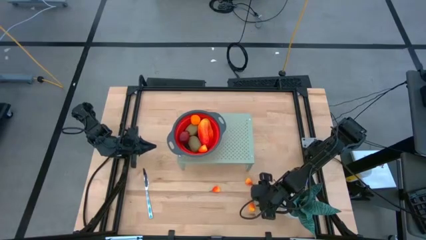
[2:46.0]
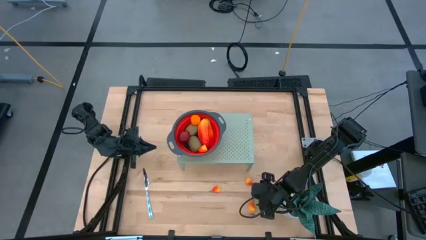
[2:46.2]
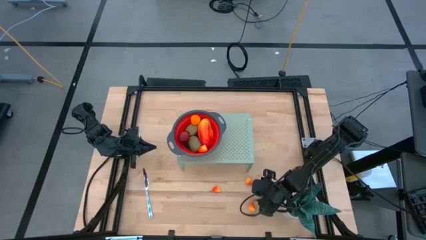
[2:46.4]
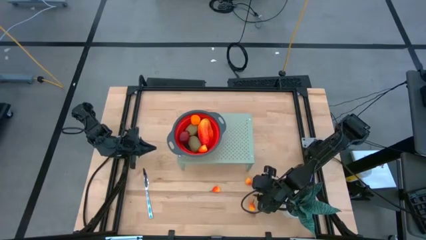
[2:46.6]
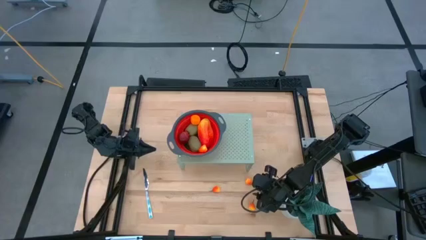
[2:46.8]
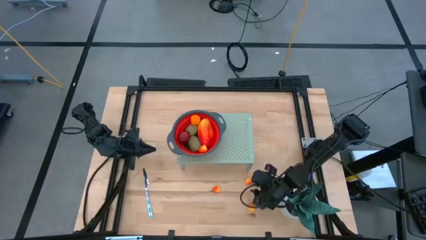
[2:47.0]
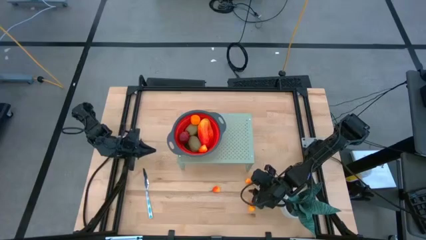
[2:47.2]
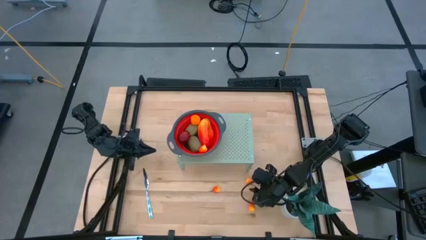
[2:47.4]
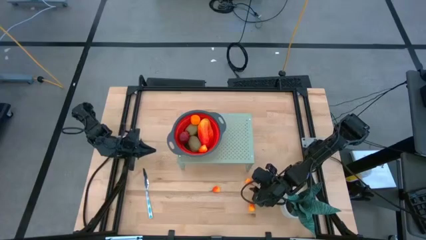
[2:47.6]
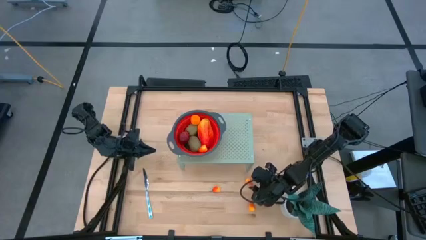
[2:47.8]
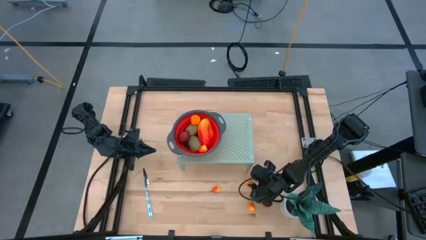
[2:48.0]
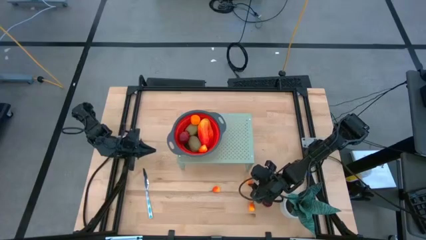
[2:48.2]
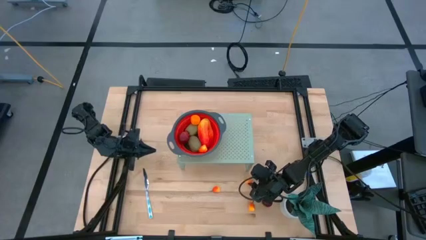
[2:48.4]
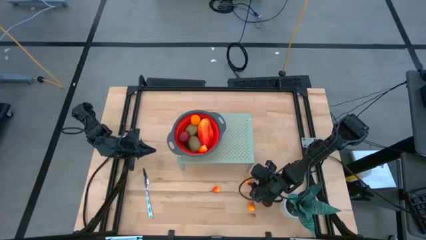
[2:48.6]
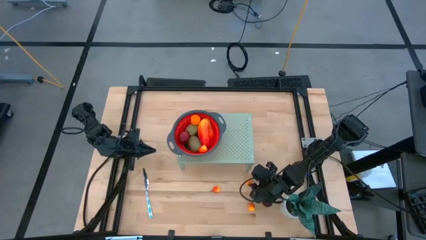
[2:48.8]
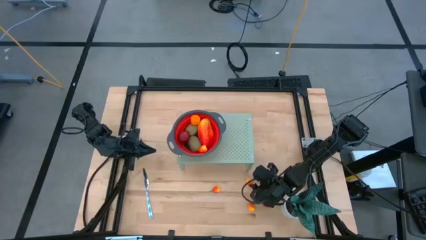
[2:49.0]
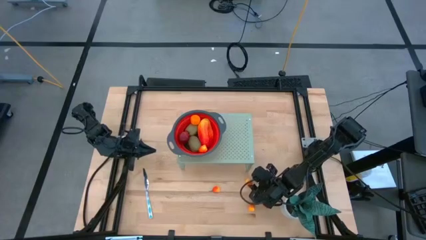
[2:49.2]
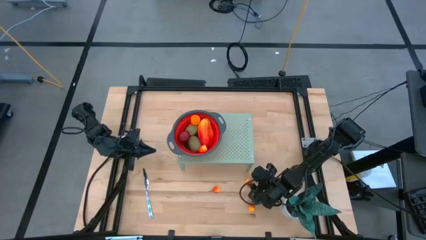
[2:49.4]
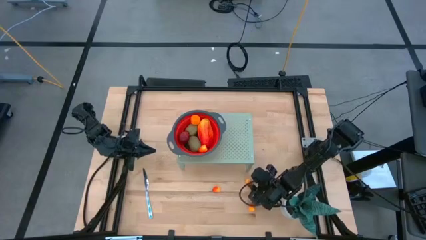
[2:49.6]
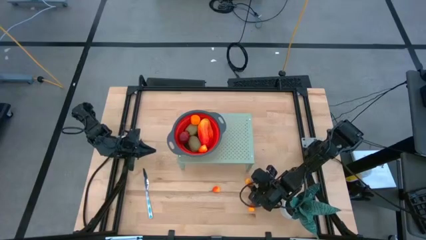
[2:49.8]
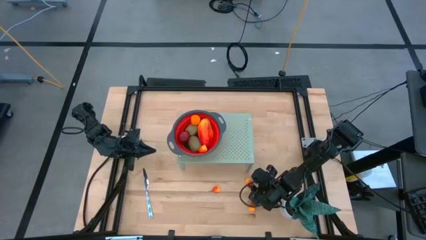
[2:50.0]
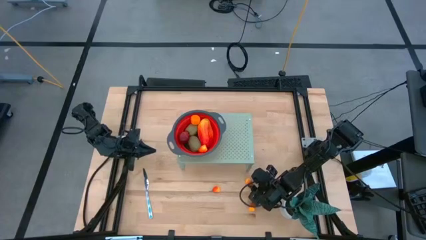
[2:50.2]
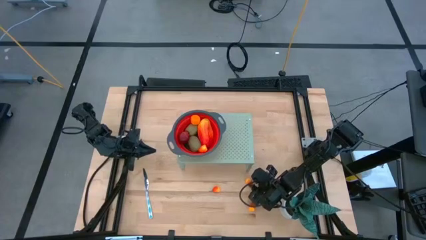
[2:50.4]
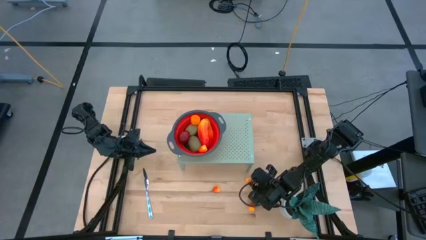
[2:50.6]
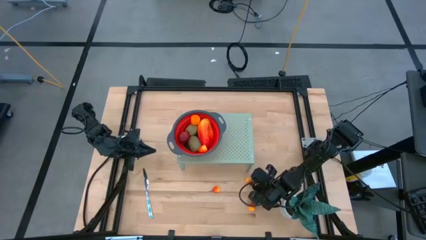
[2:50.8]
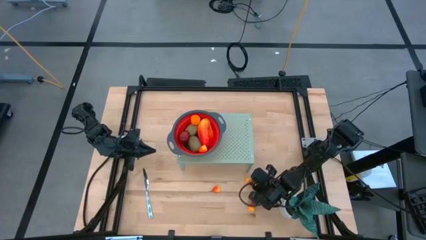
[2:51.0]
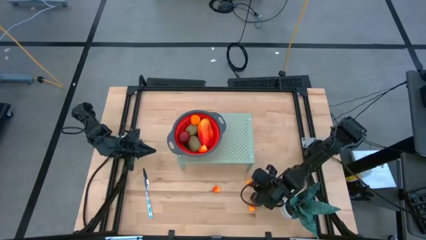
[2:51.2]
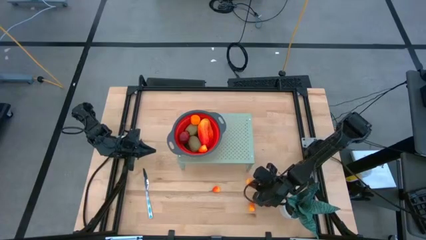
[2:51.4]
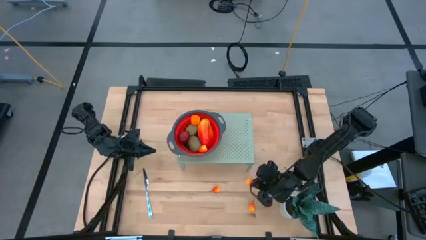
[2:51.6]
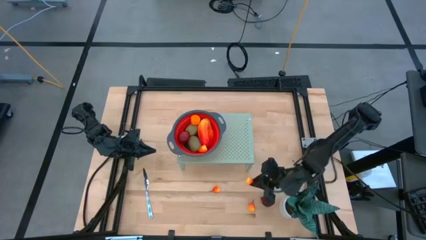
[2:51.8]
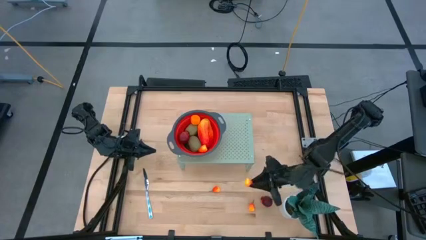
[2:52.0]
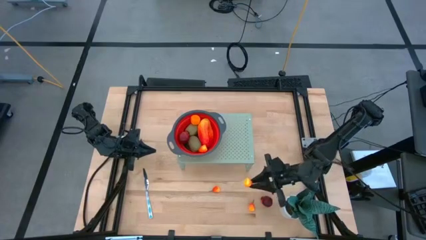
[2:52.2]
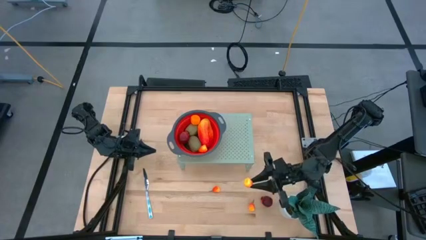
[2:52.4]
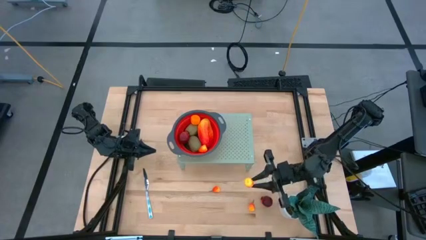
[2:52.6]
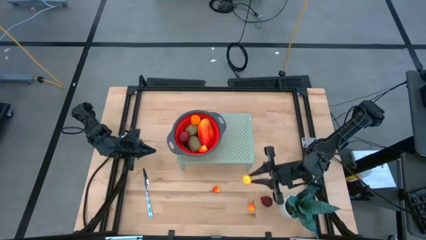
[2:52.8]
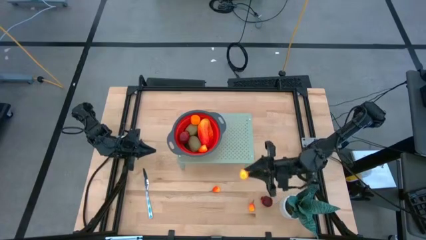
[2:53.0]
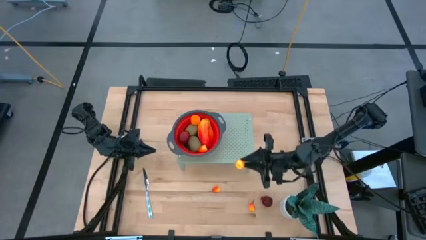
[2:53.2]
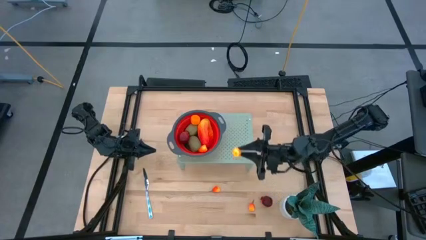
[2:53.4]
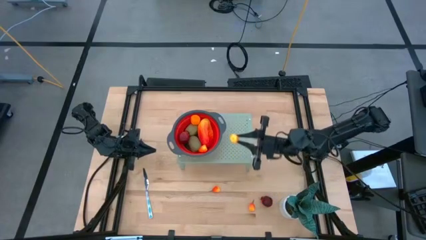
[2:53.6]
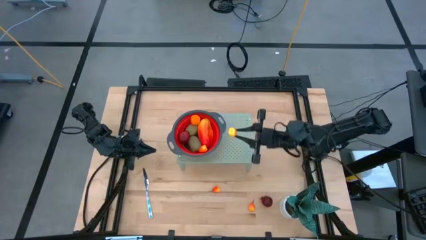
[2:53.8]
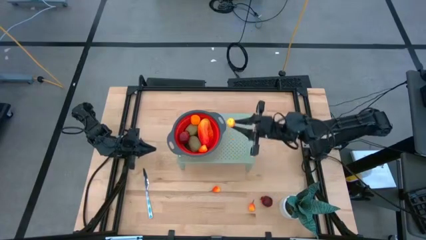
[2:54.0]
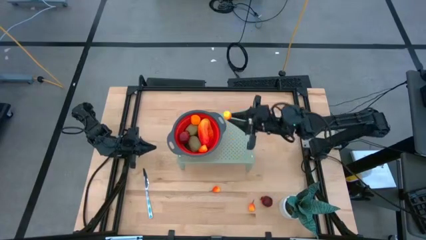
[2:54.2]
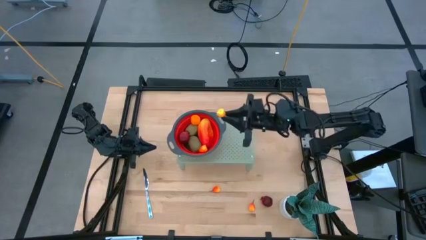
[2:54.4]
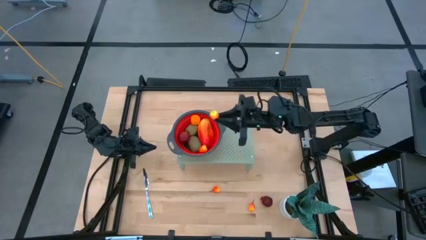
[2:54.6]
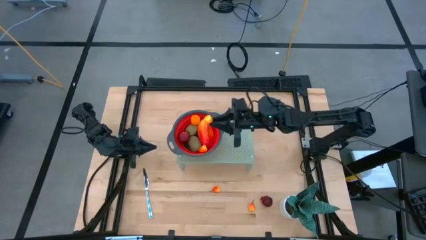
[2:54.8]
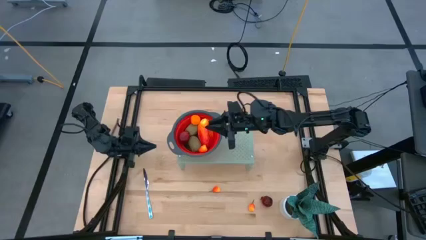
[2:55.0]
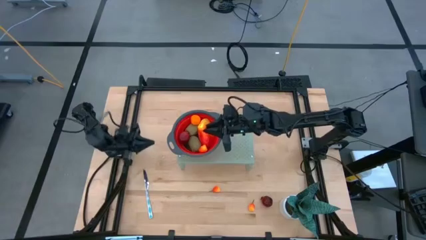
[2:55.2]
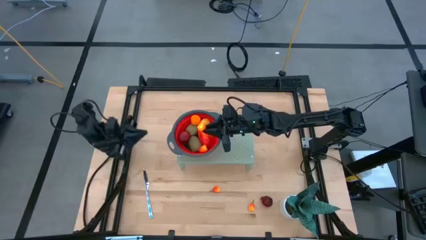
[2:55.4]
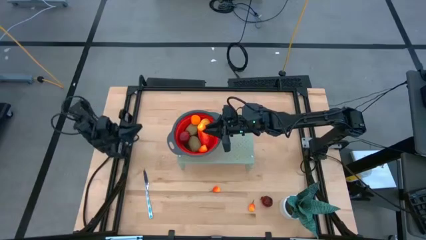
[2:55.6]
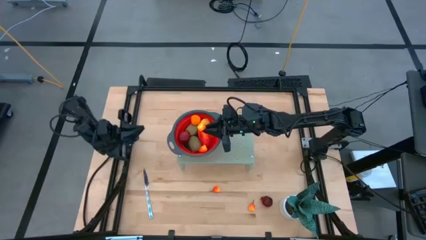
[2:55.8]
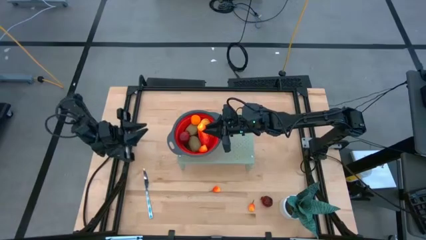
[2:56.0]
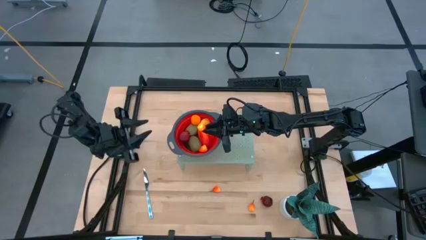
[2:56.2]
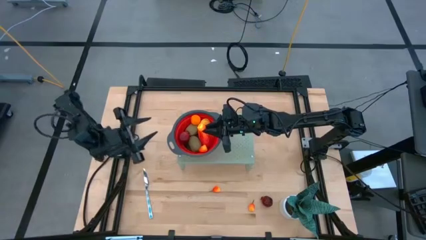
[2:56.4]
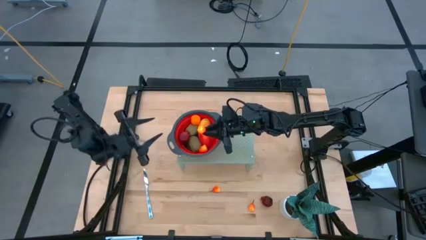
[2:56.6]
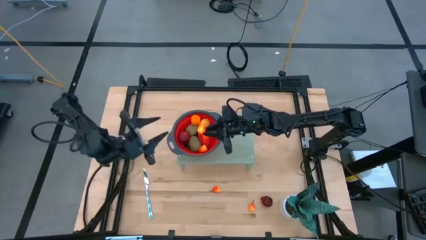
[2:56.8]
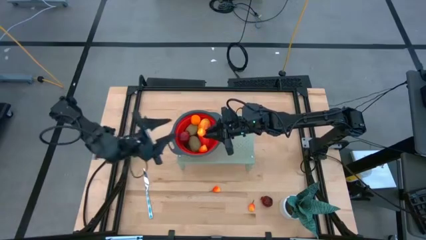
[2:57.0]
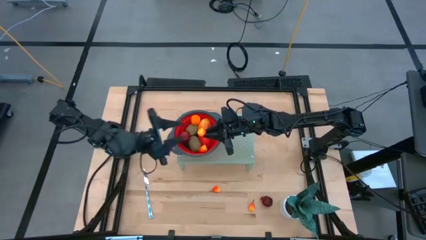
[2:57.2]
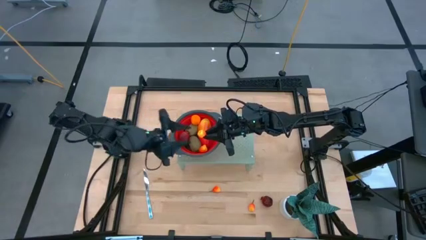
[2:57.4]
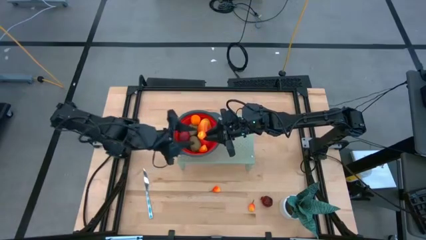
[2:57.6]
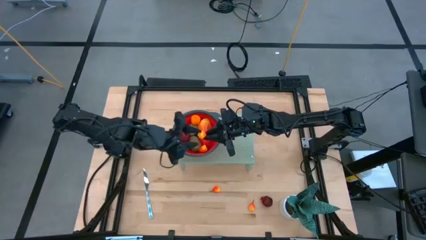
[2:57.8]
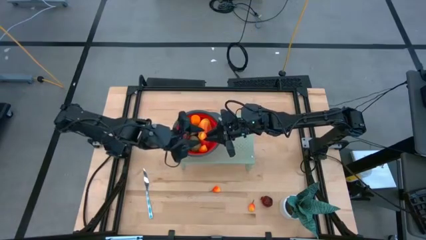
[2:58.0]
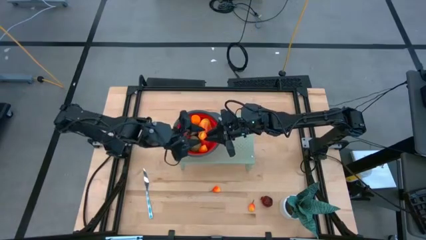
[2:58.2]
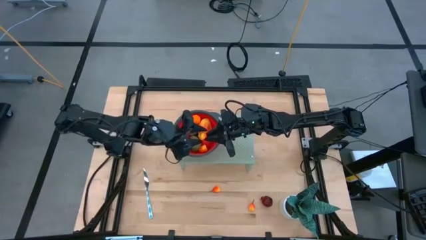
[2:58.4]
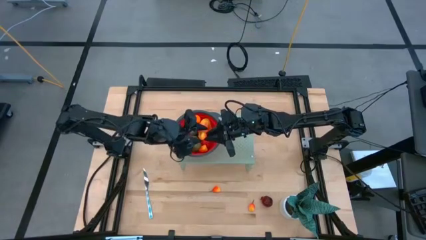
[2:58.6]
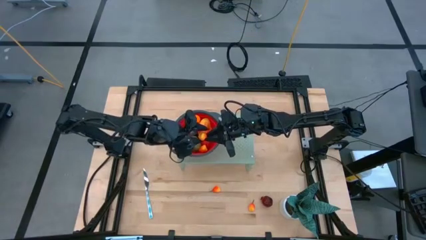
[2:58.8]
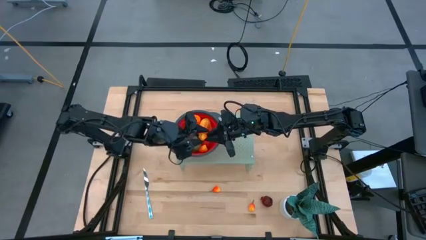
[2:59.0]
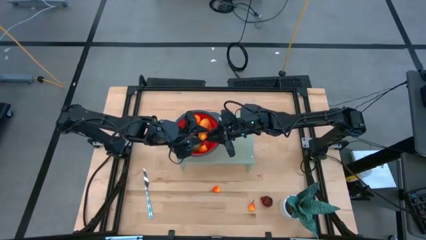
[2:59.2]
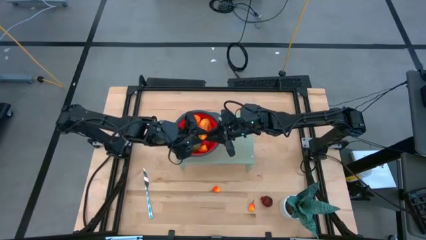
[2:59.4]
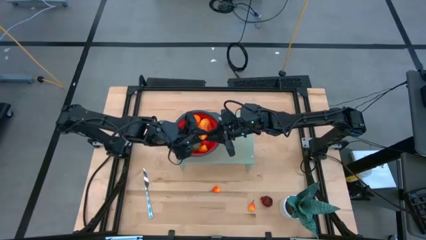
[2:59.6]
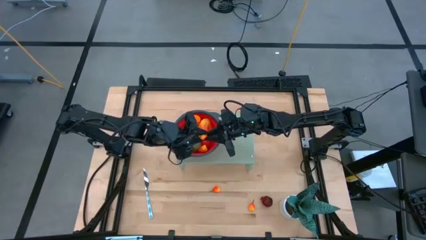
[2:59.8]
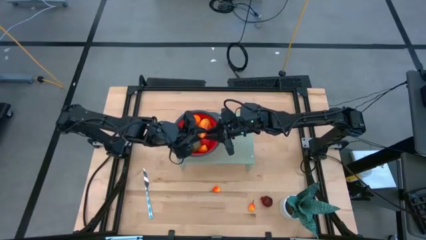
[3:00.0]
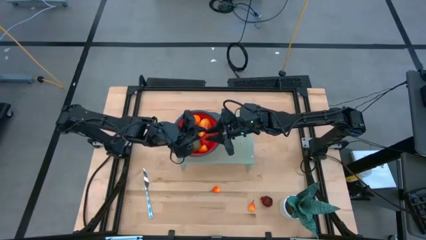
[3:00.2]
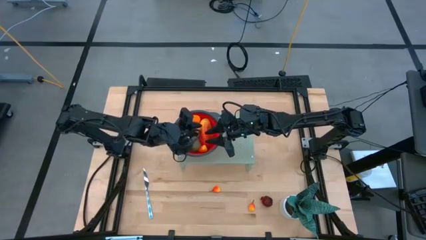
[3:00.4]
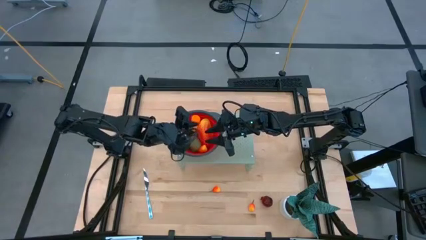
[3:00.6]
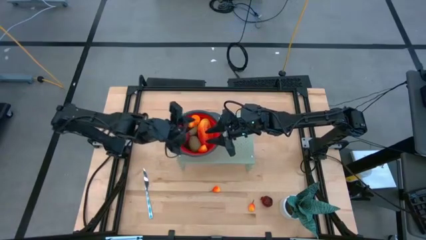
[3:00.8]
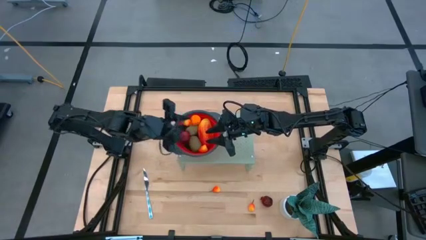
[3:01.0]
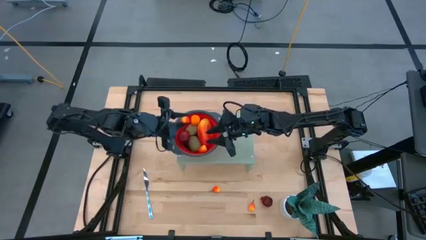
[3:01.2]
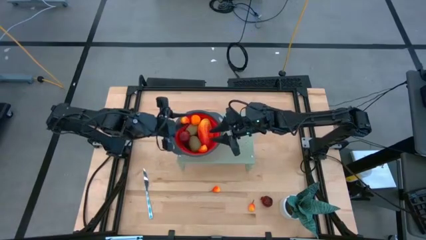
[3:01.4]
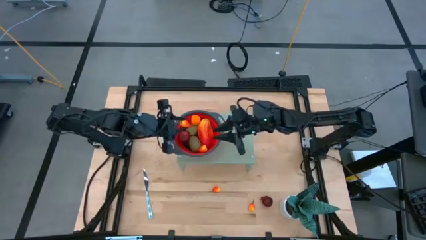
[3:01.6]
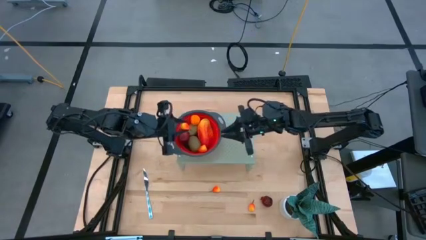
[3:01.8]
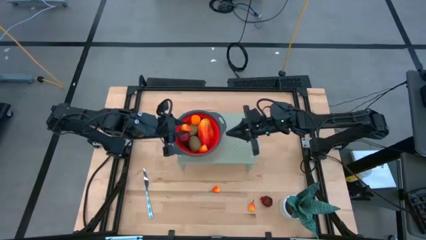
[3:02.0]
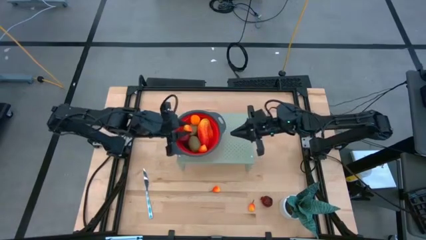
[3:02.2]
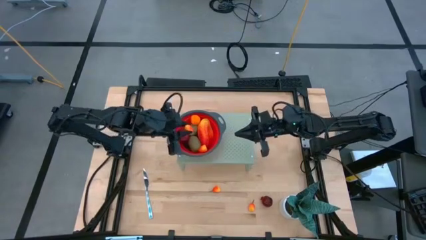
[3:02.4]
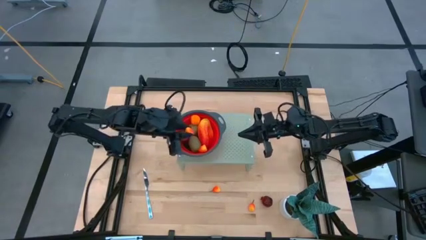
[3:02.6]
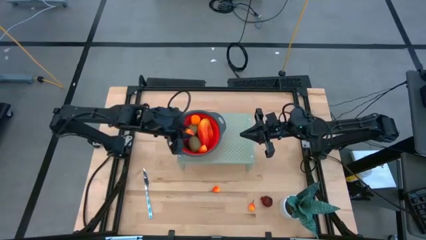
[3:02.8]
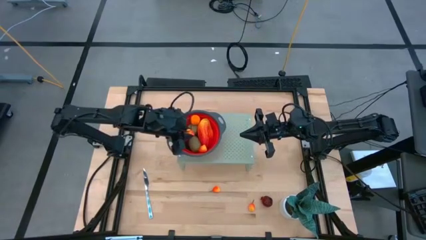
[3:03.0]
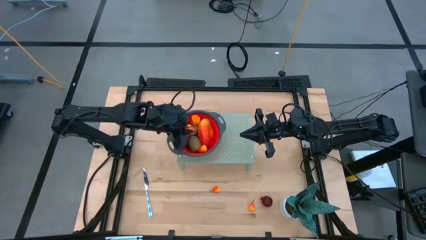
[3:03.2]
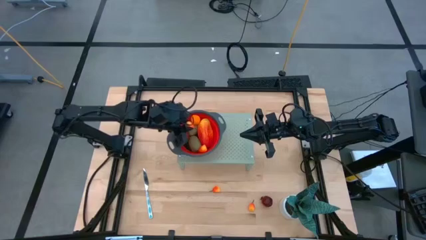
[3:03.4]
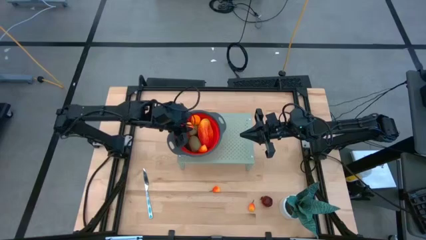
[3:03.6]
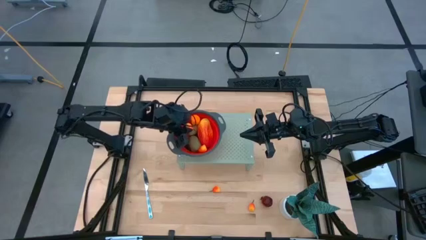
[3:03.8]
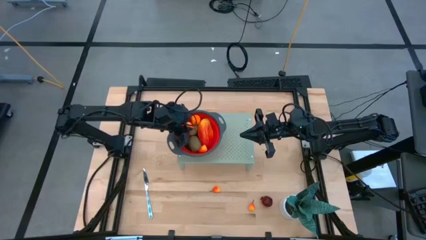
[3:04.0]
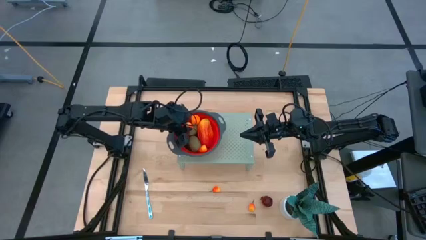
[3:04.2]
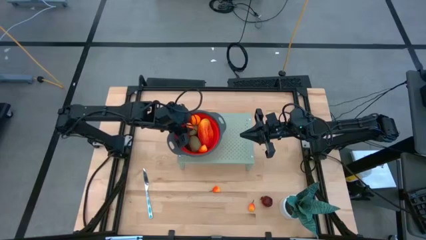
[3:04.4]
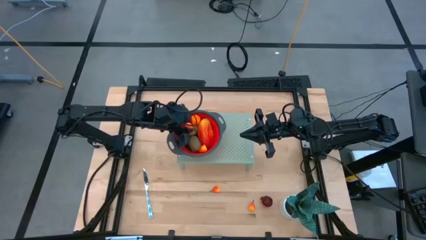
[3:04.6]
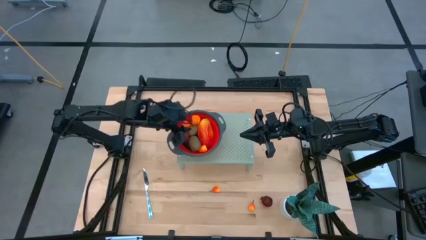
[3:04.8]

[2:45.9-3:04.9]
Task: Pick & Place Fruit
Put the peach fruit into the strainer
